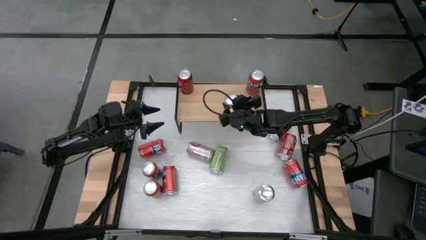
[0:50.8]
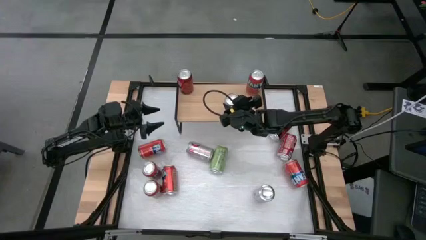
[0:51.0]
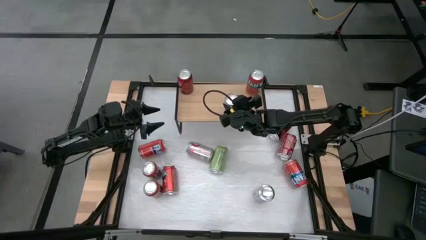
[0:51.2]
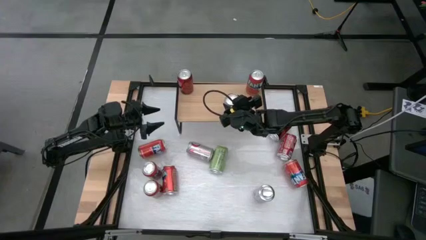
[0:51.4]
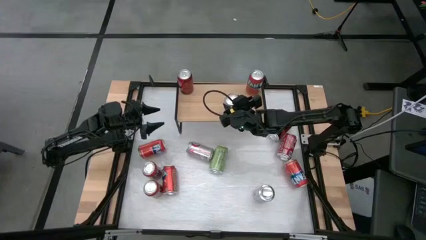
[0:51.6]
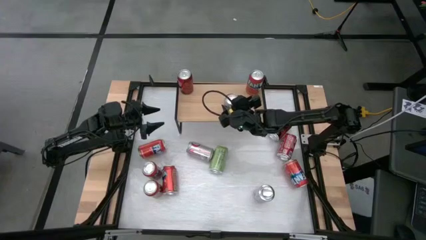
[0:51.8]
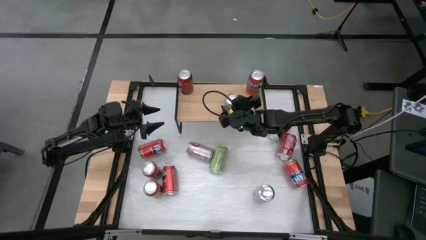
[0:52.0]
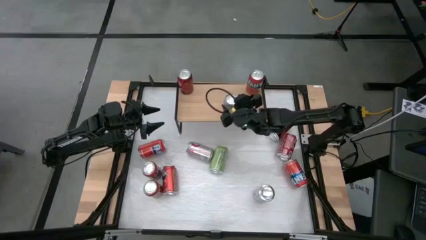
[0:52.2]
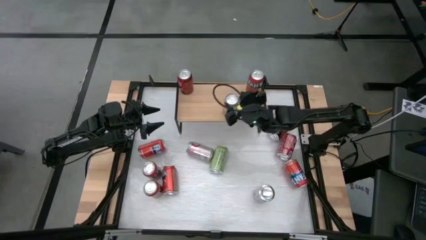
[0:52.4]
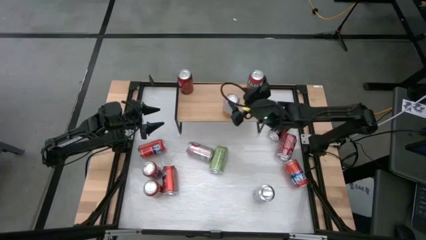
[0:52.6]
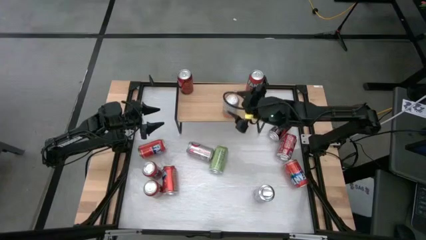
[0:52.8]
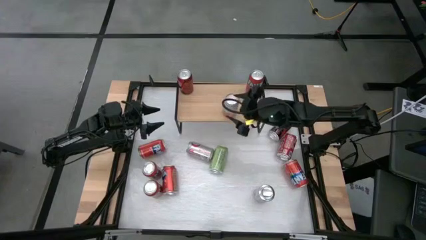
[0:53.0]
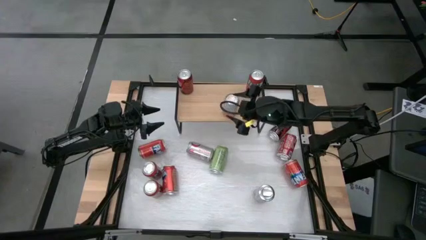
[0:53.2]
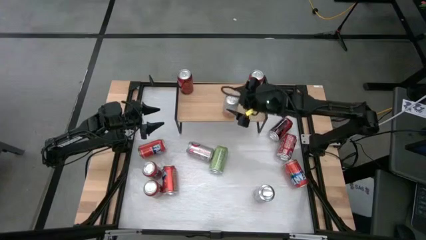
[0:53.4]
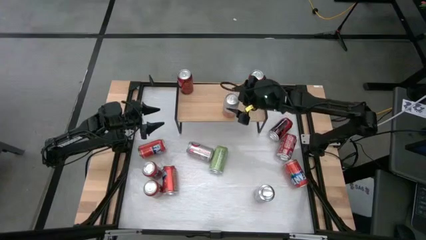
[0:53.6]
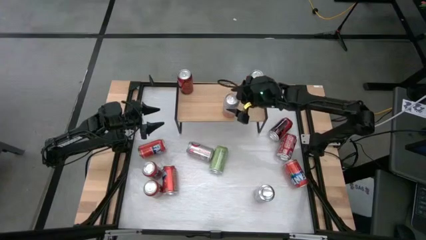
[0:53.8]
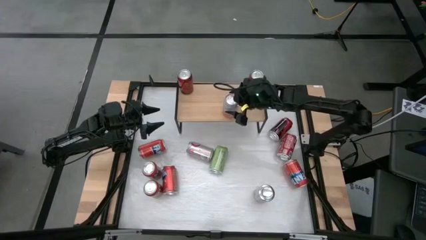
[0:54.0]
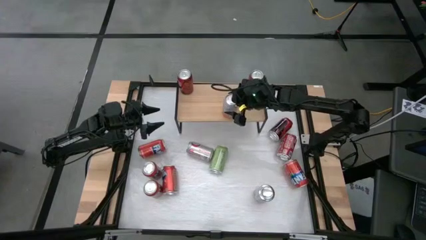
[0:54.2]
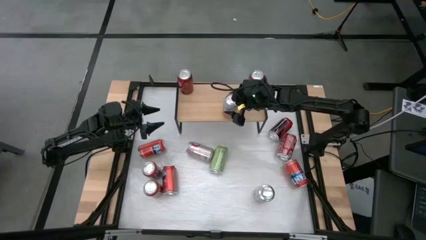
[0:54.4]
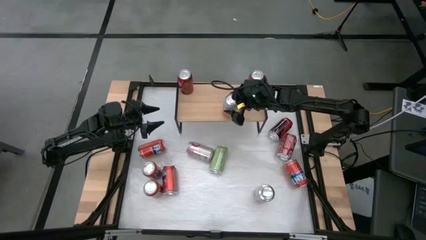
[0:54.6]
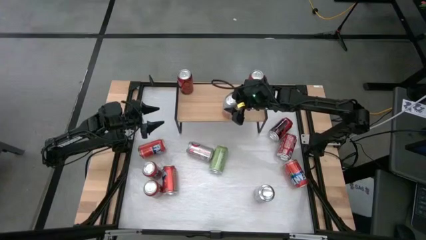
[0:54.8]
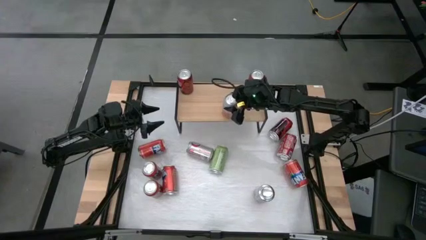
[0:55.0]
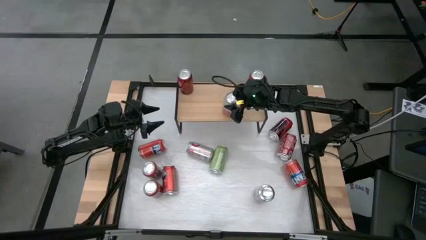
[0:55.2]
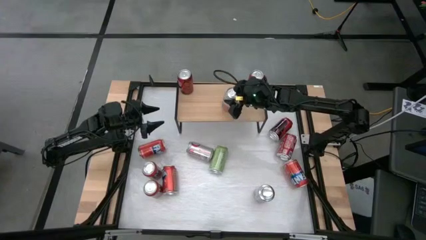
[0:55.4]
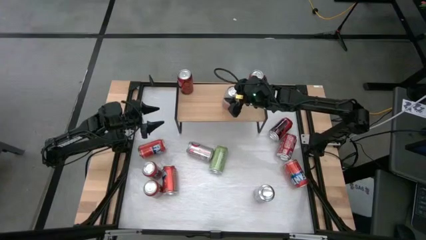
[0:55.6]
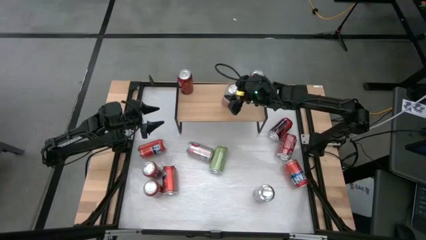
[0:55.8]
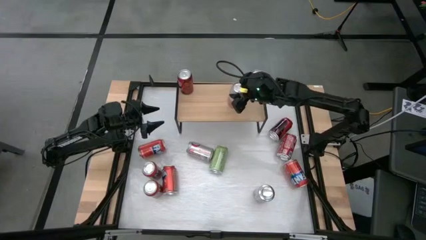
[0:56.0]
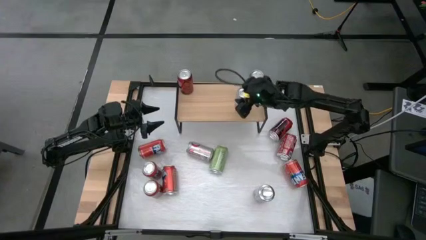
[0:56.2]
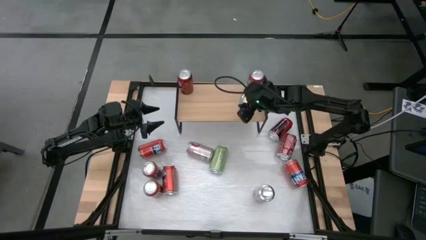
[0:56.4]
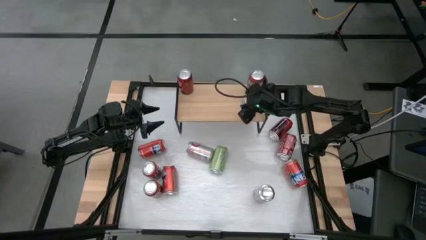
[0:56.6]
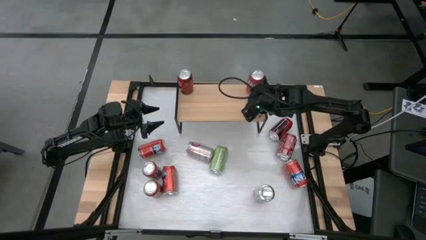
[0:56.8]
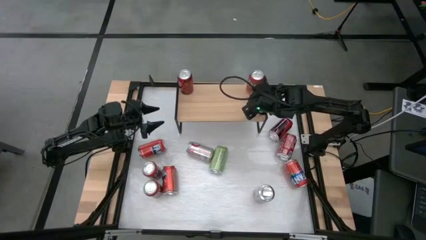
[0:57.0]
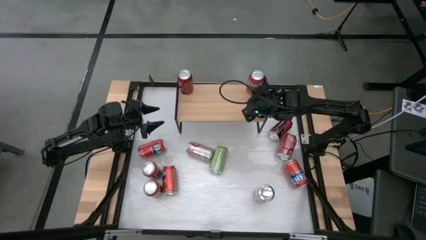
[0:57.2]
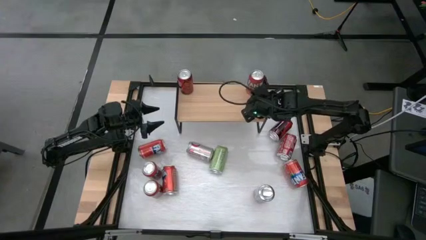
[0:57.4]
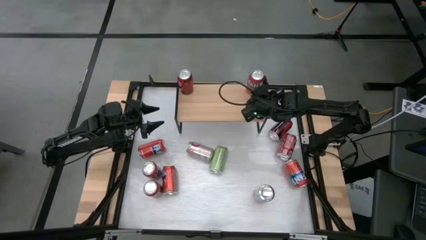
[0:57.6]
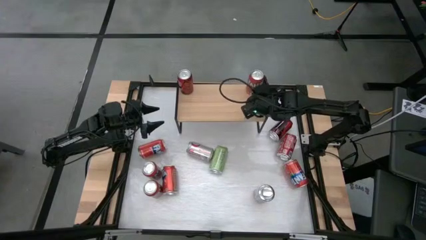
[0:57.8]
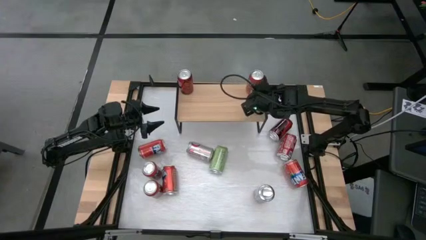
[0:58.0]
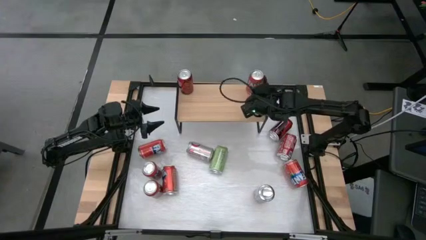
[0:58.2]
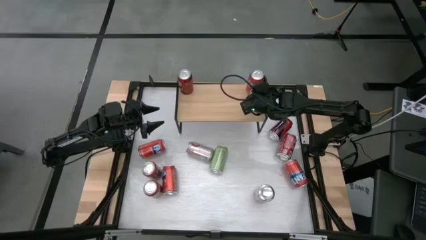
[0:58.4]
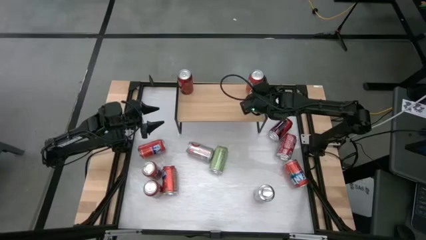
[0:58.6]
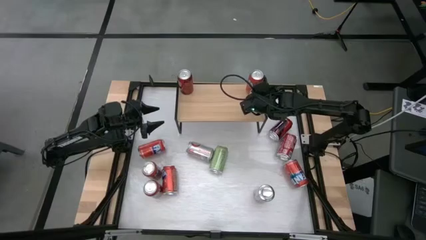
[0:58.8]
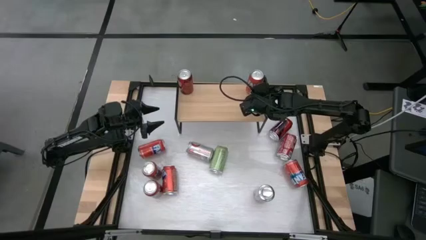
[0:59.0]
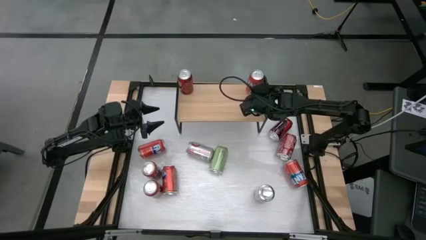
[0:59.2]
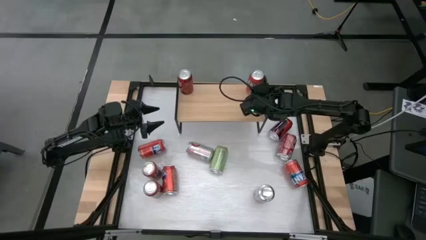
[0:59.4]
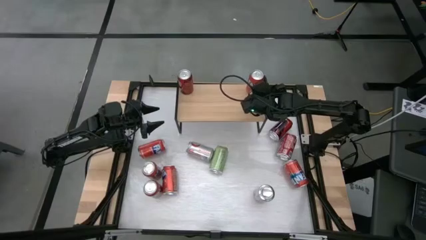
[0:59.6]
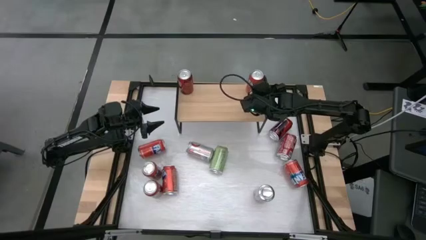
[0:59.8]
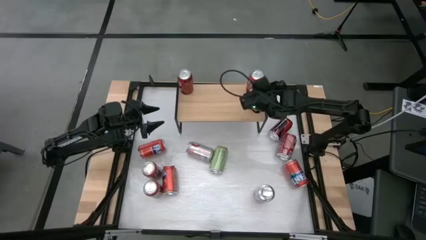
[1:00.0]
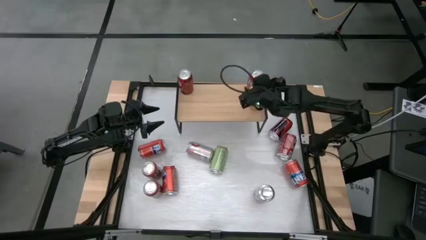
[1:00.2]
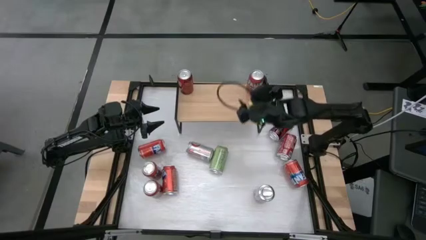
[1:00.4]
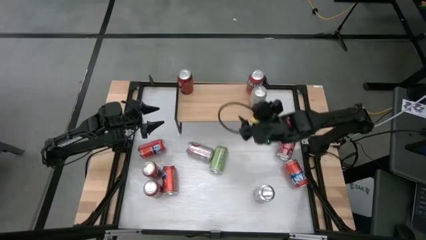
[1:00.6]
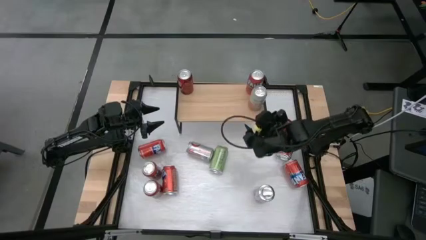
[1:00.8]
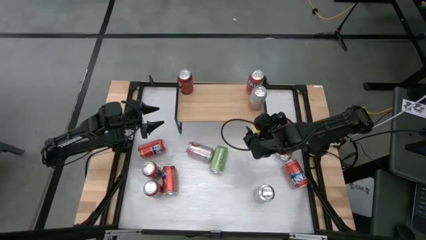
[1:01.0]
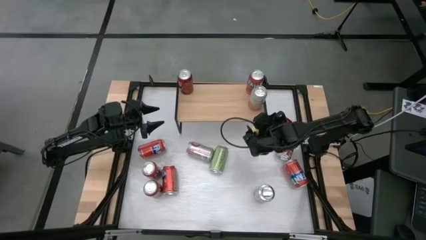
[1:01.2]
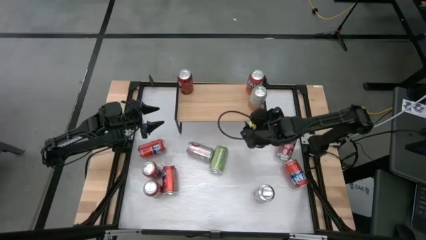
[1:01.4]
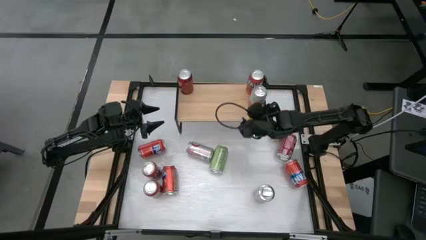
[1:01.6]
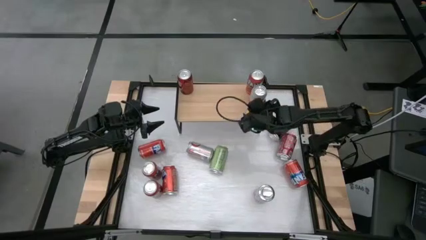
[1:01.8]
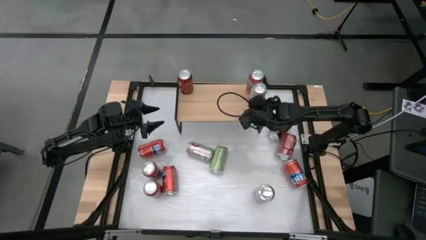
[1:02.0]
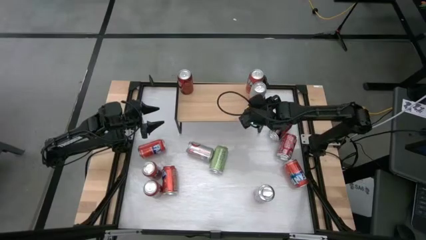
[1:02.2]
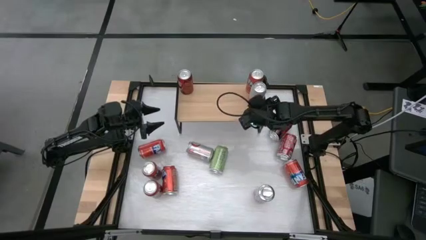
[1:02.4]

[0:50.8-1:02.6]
Task: Place canned beverage on shelf
Put the orange white soda can on the shelf
